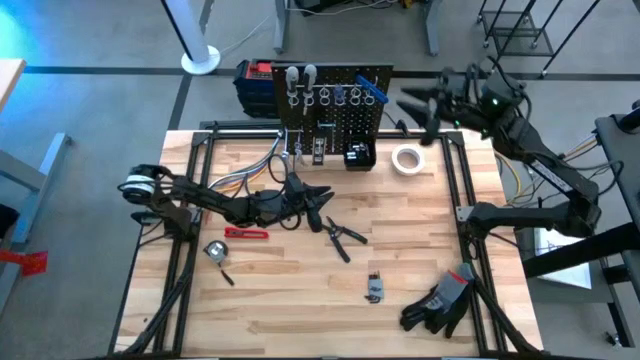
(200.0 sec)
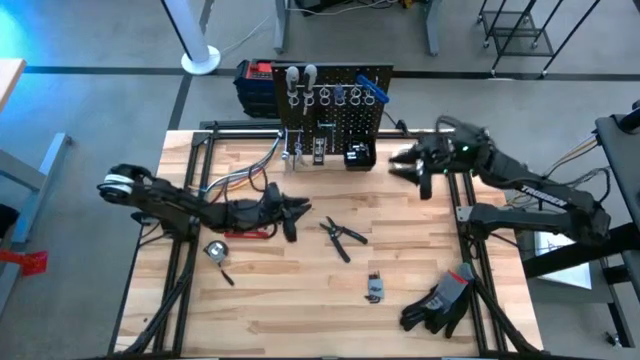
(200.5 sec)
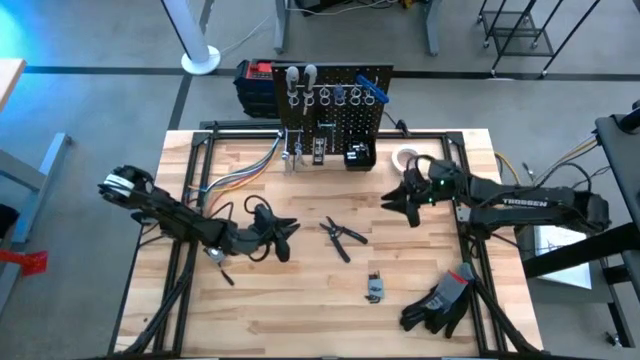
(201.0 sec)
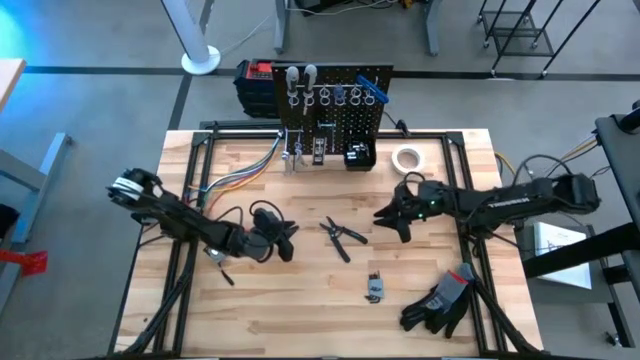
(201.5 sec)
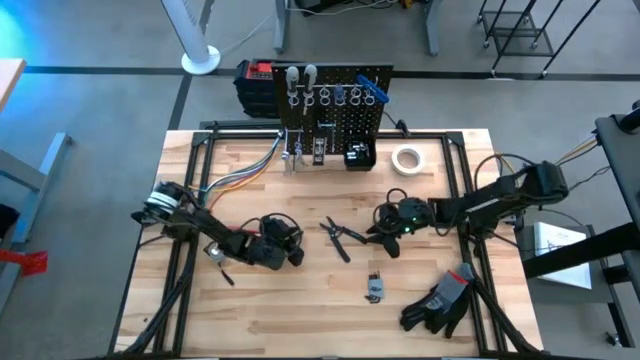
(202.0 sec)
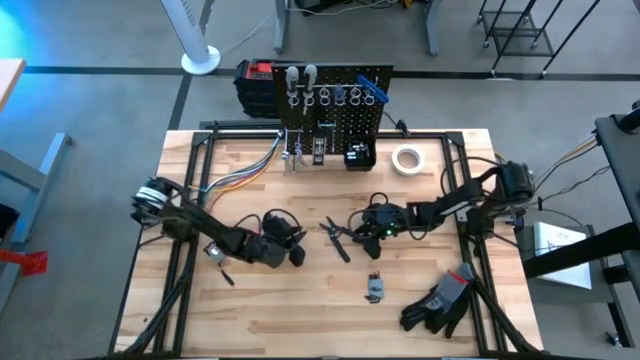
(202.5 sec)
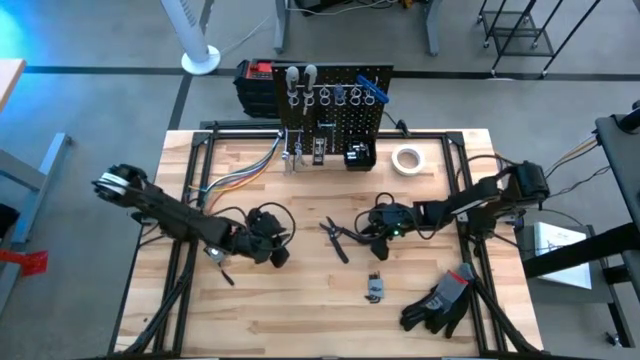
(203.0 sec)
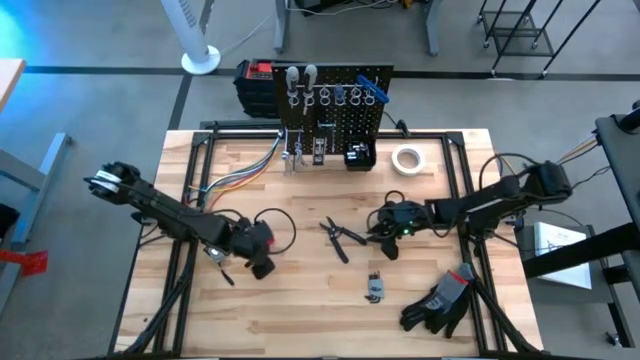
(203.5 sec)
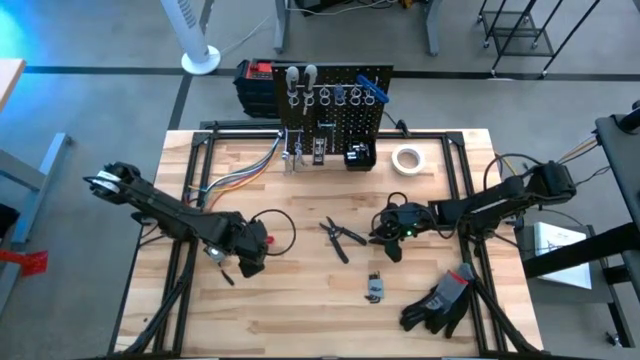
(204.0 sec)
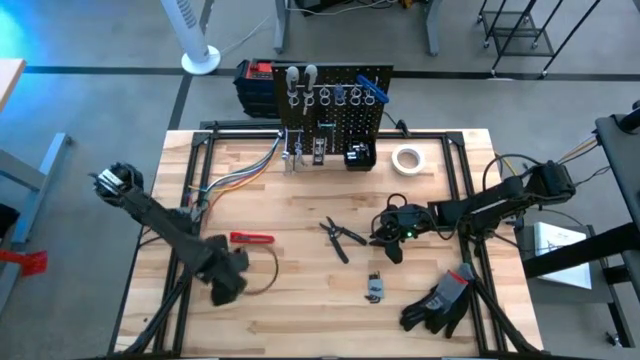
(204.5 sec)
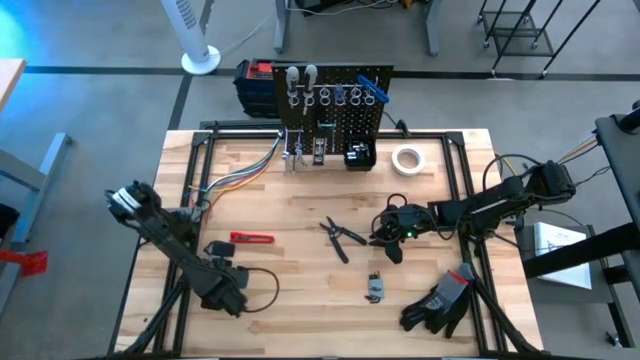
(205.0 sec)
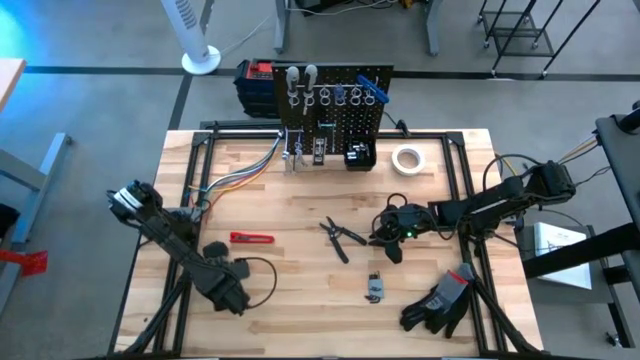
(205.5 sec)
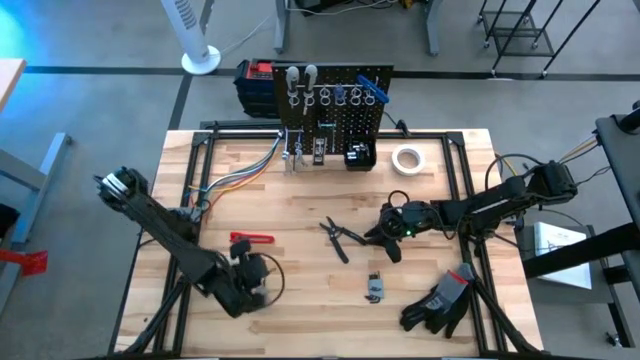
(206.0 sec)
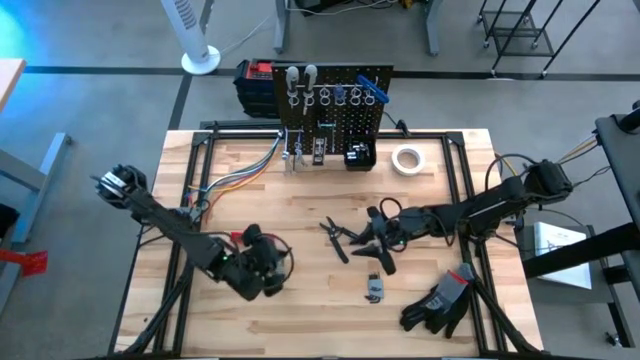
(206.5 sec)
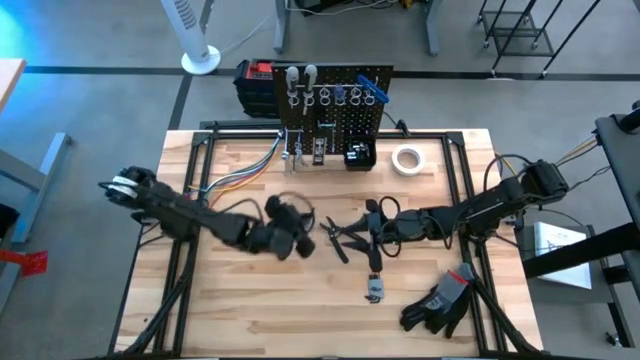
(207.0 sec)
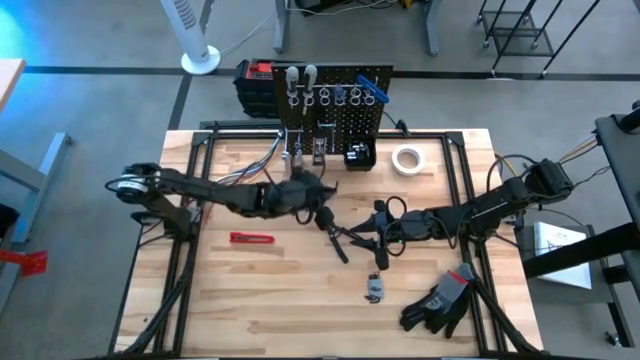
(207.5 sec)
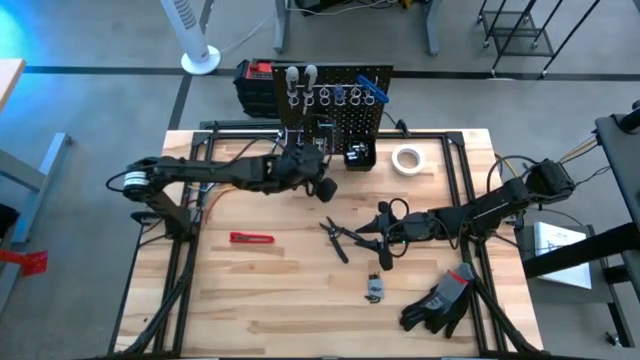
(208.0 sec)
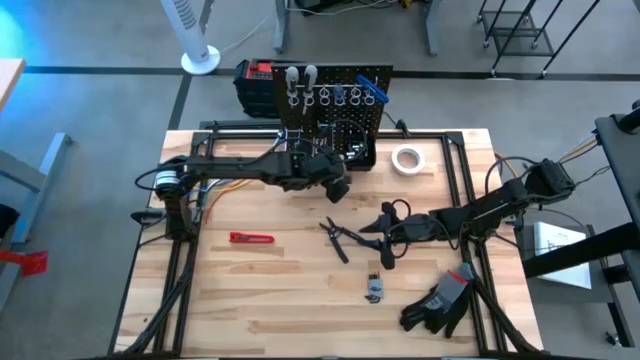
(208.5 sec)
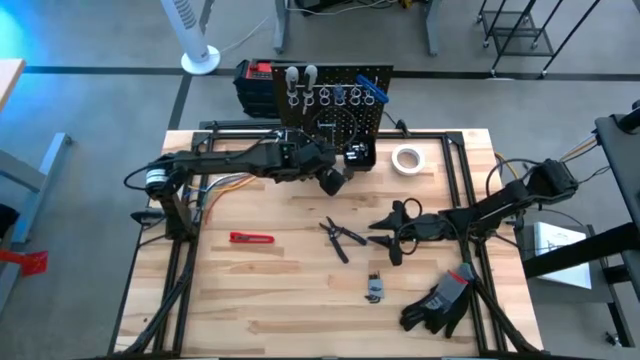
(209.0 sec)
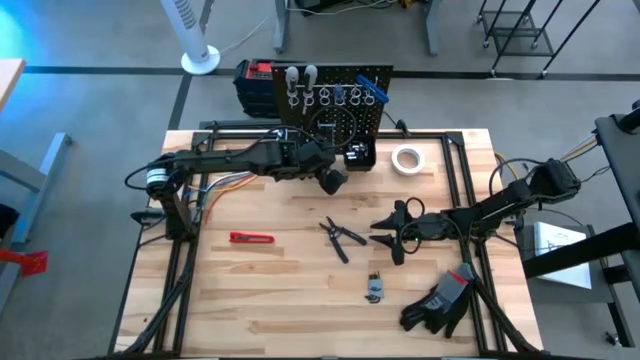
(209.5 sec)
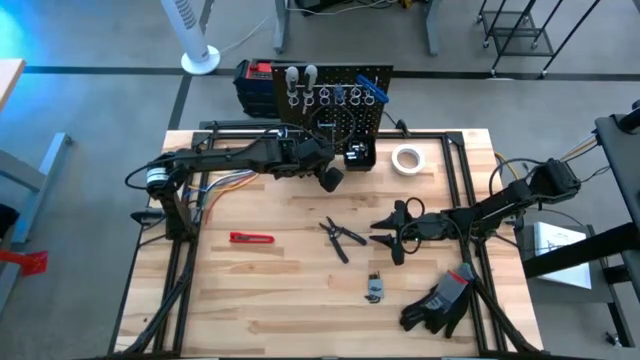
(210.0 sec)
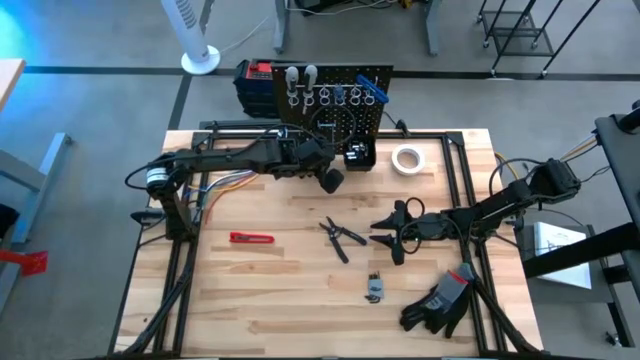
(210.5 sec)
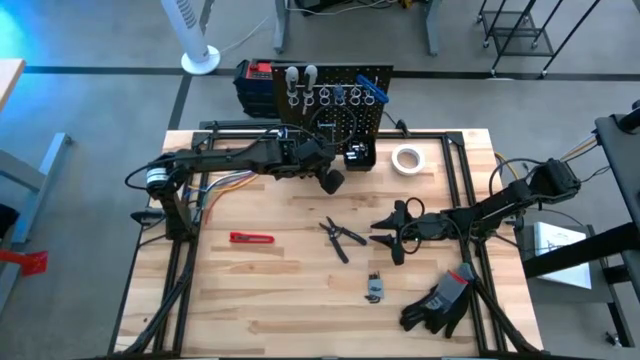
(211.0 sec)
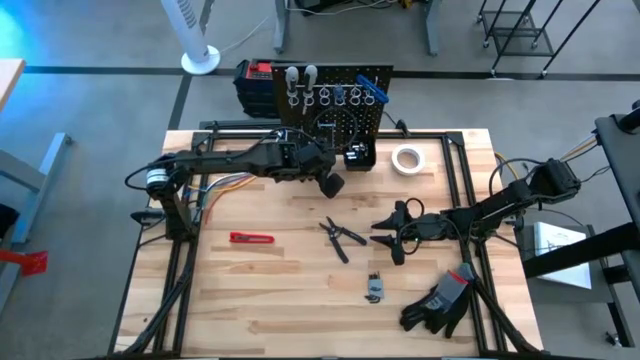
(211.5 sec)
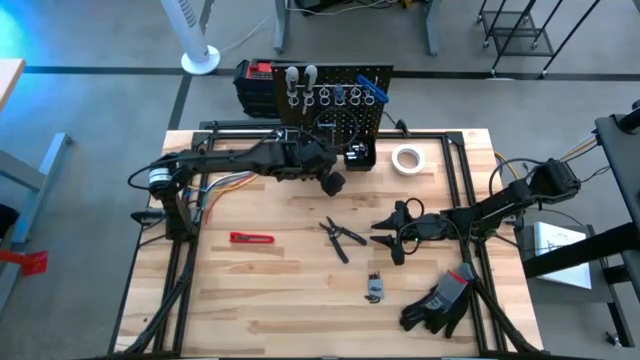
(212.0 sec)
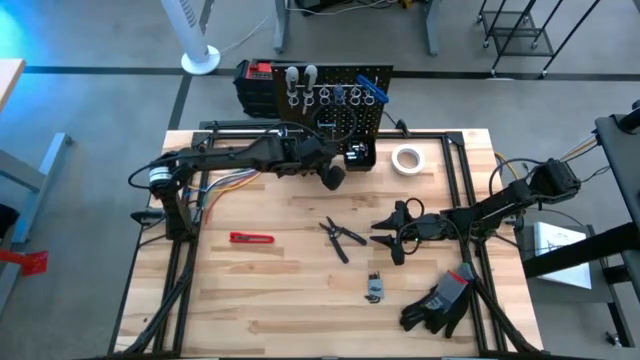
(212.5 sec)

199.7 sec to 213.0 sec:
Task: Hang tools onto peg board
Hang the tape measure on peg board

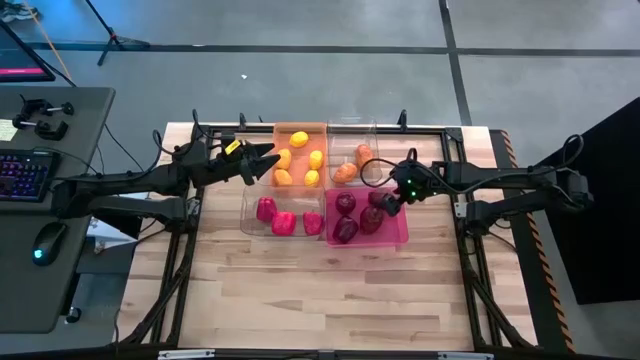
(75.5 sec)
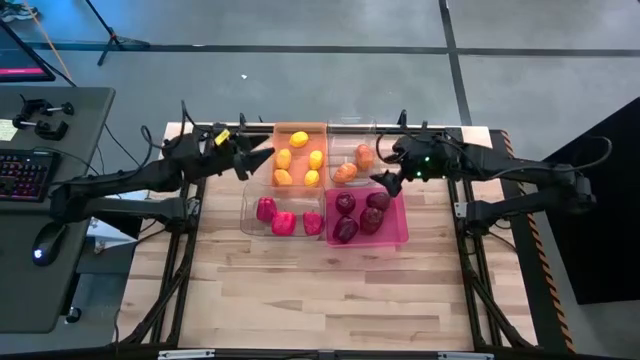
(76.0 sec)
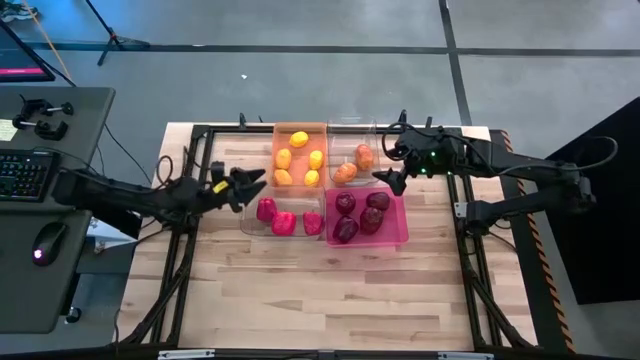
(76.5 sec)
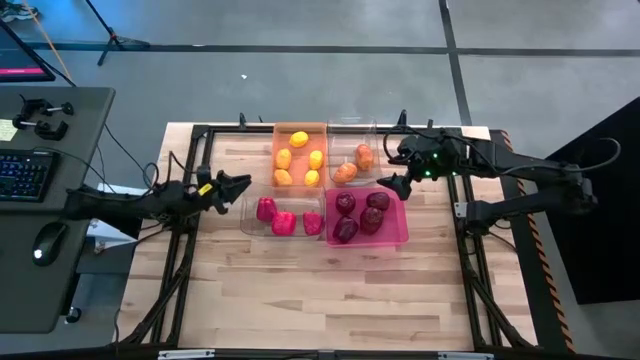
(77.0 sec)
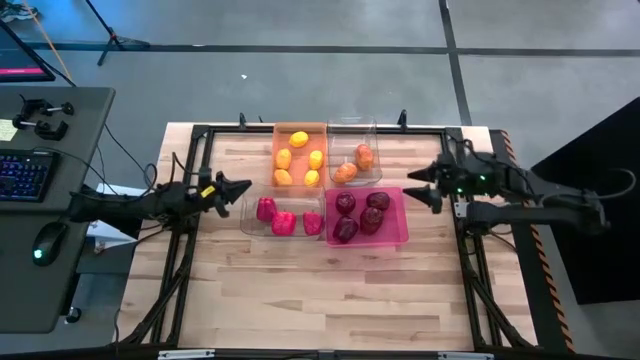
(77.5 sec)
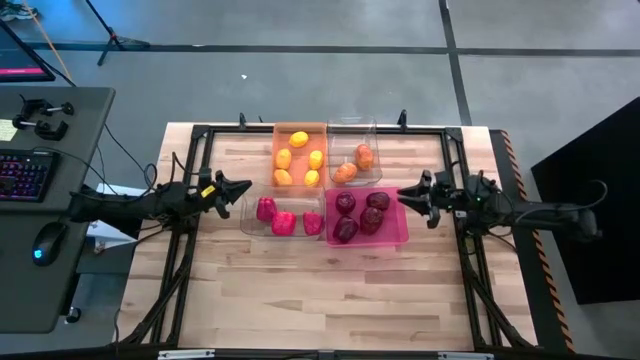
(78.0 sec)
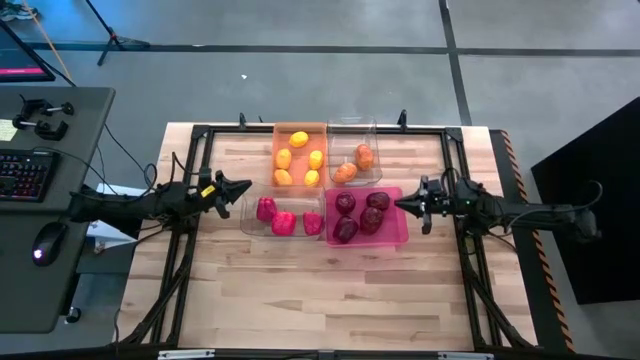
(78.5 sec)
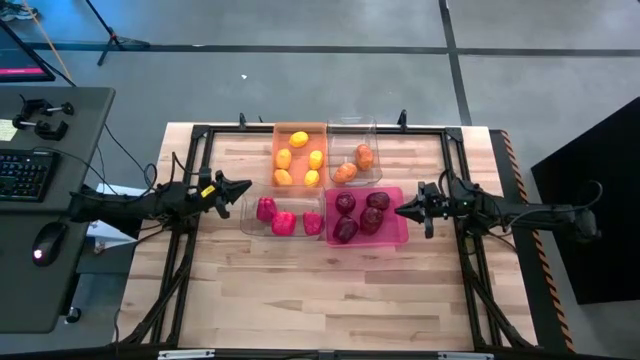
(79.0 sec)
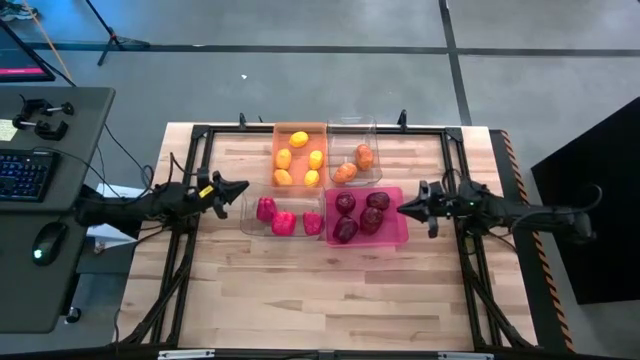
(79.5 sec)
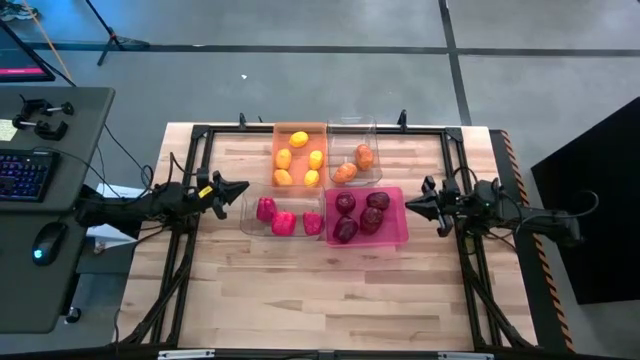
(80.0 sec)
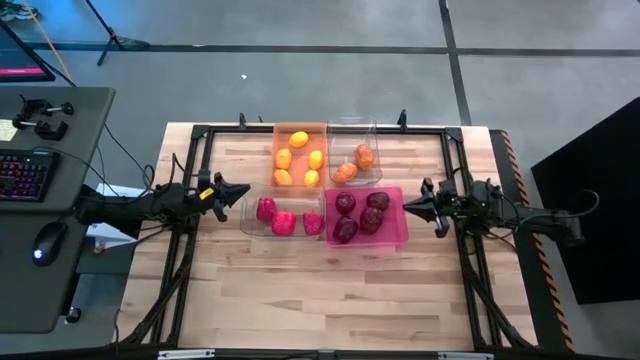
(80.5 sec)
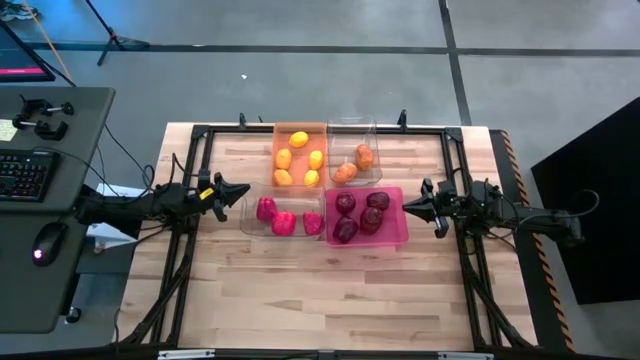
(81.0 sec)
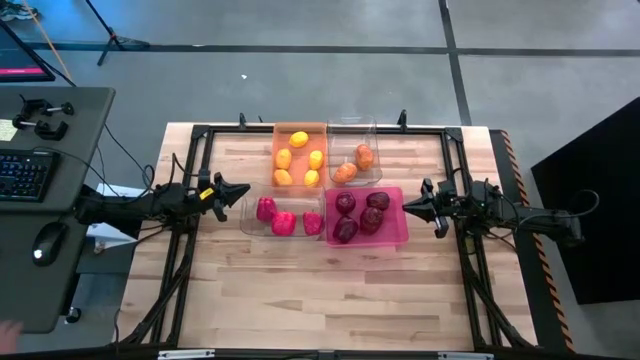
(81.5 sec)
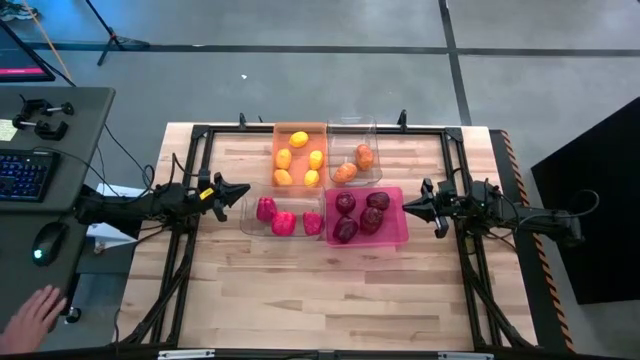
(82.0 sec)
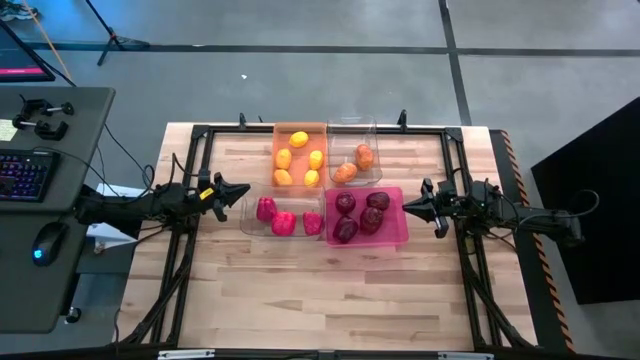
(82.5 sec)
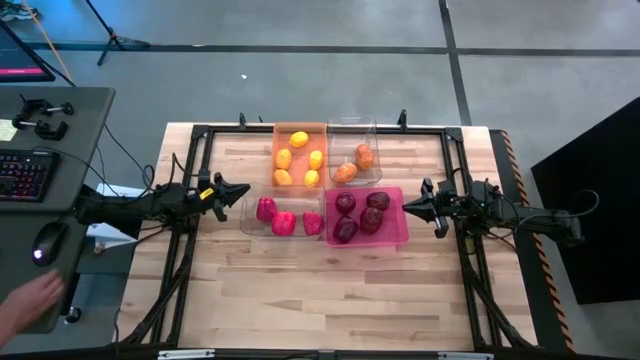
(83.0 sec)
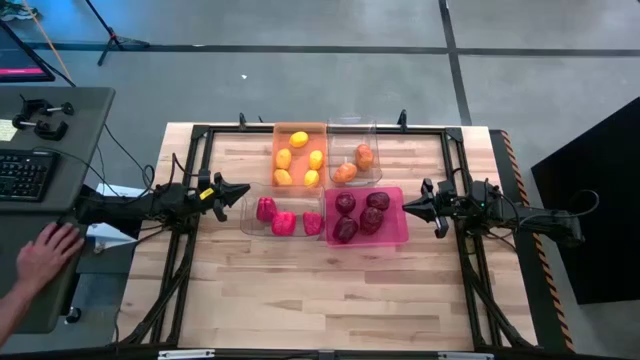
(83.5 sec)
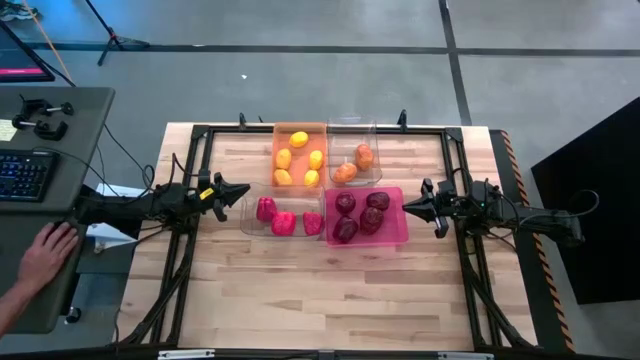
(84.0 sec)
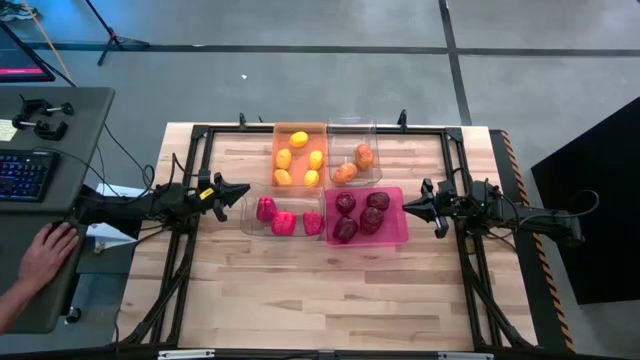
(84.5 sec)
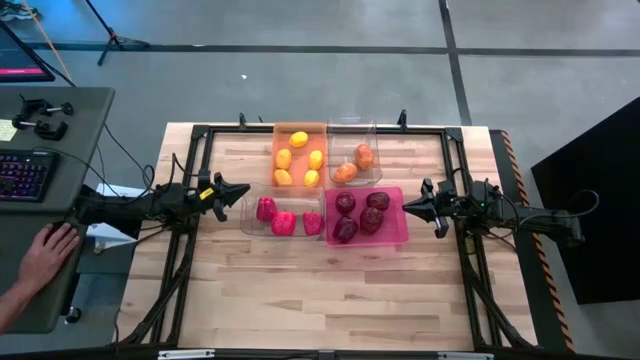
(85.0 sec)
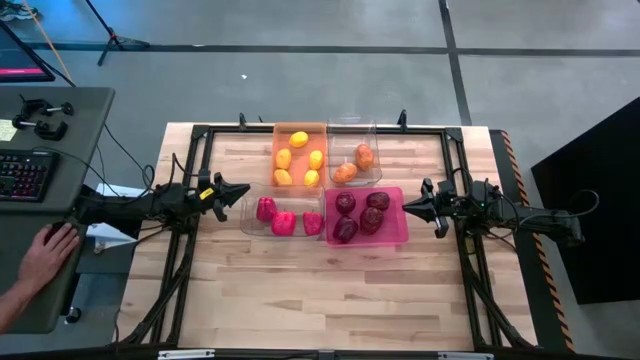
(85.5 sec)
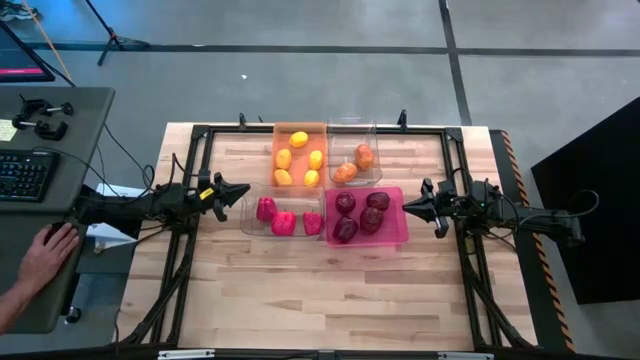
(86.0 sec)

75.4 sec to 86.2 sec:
Task: Sort produce into baskets
Return to Home Position
